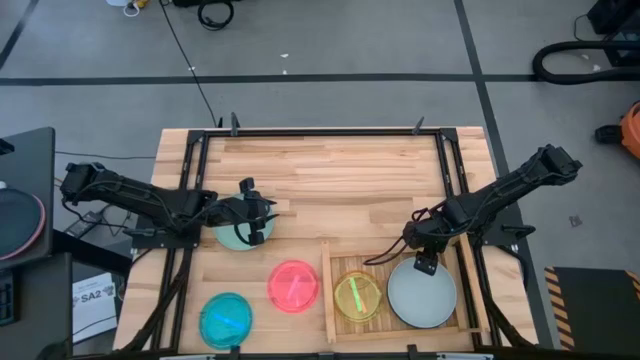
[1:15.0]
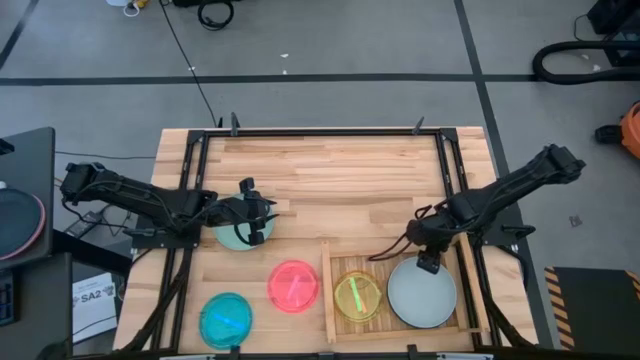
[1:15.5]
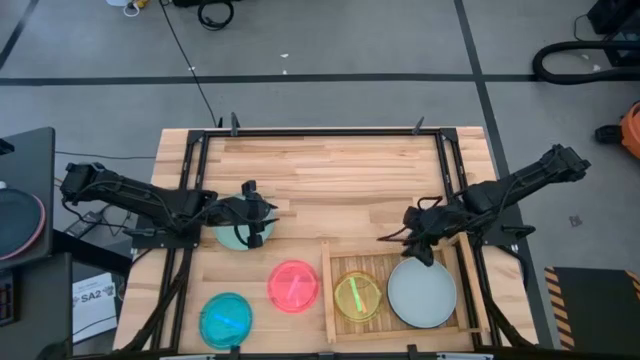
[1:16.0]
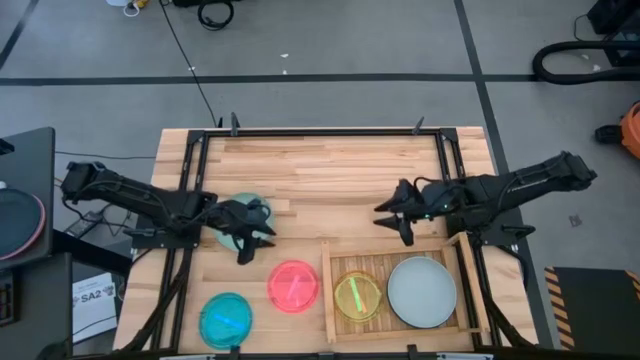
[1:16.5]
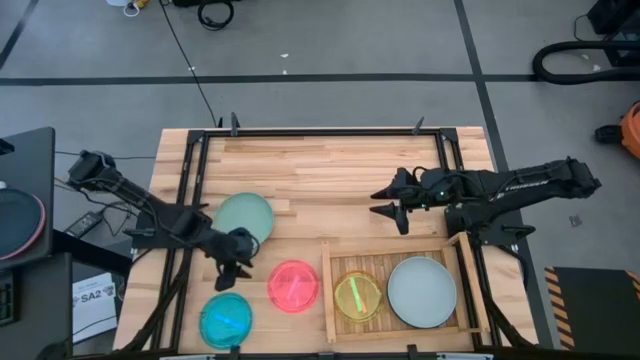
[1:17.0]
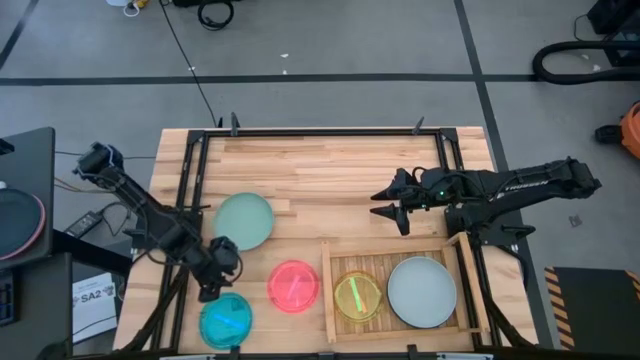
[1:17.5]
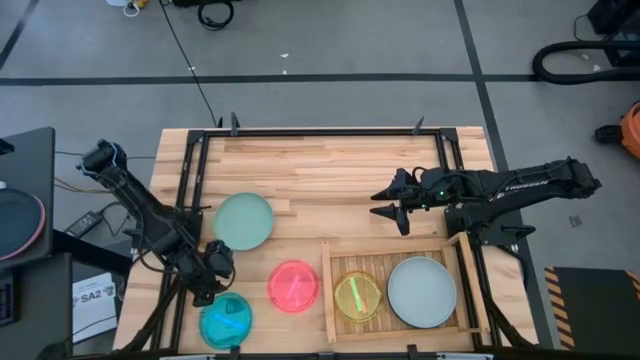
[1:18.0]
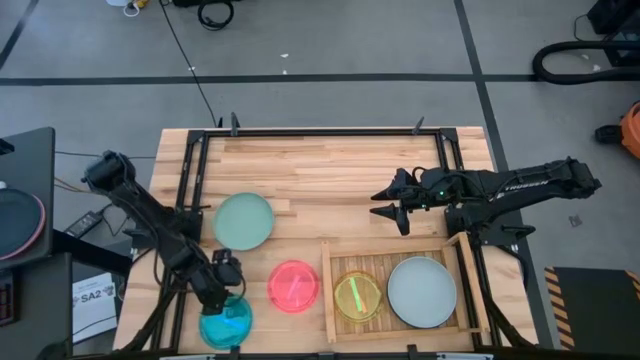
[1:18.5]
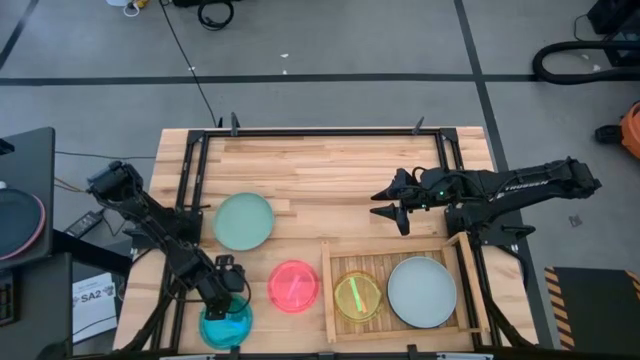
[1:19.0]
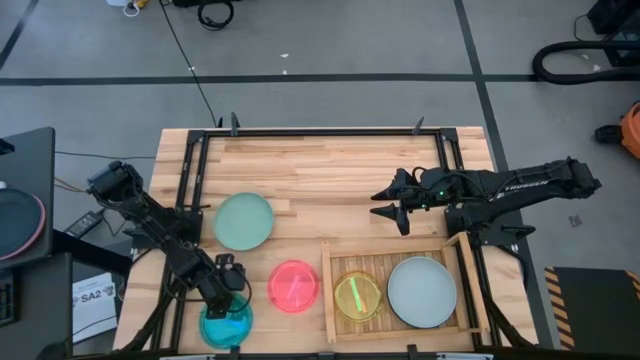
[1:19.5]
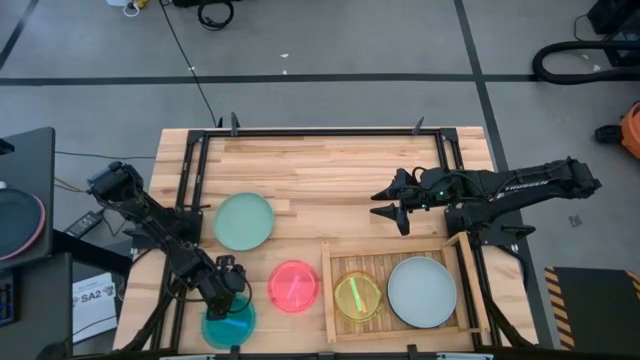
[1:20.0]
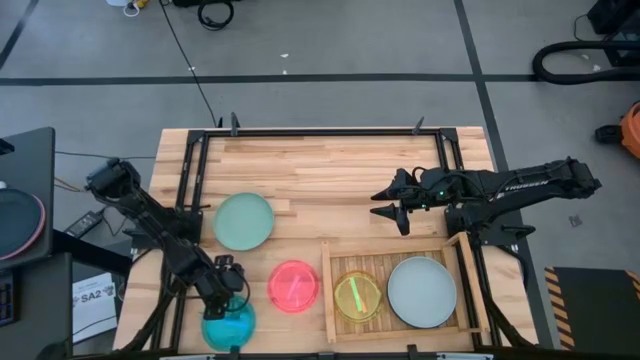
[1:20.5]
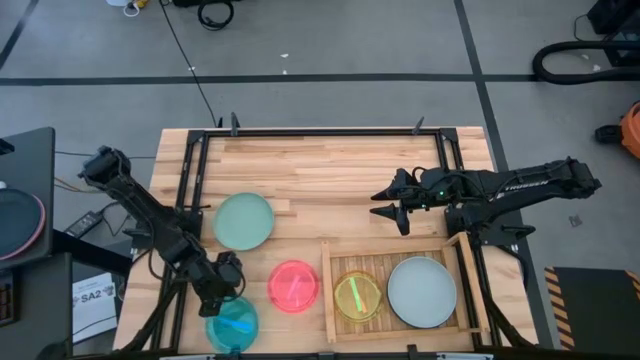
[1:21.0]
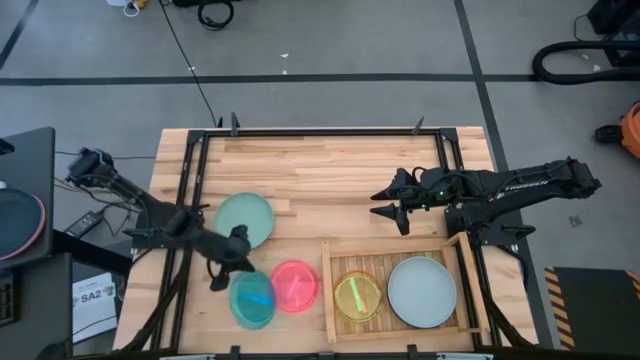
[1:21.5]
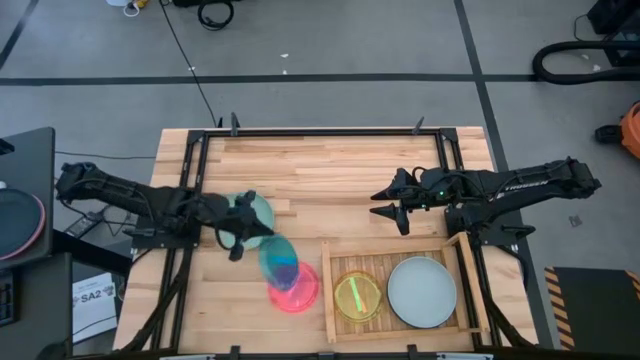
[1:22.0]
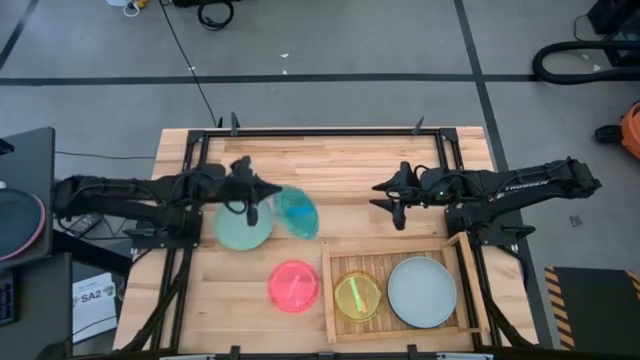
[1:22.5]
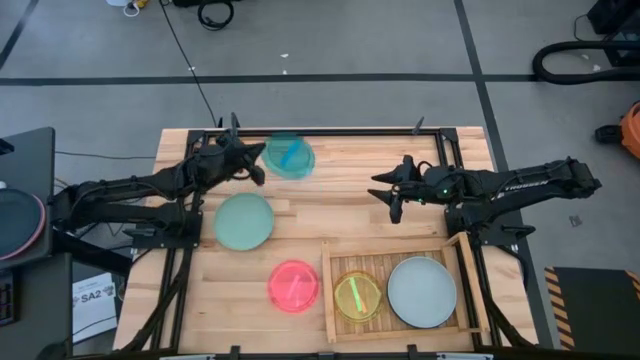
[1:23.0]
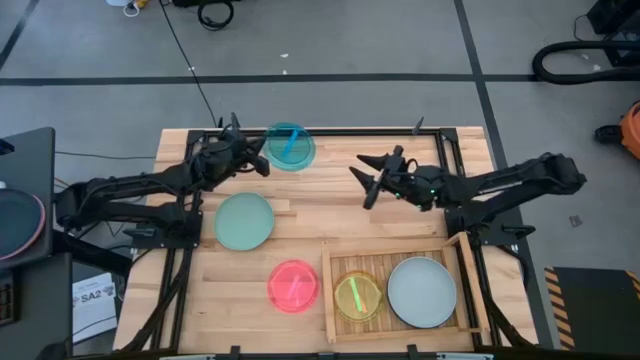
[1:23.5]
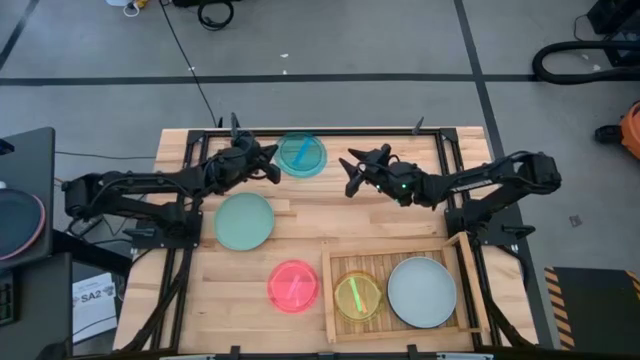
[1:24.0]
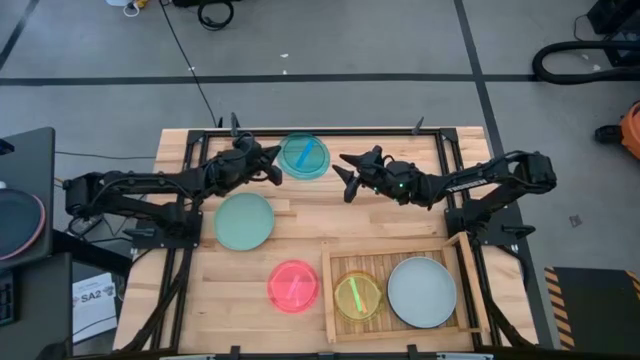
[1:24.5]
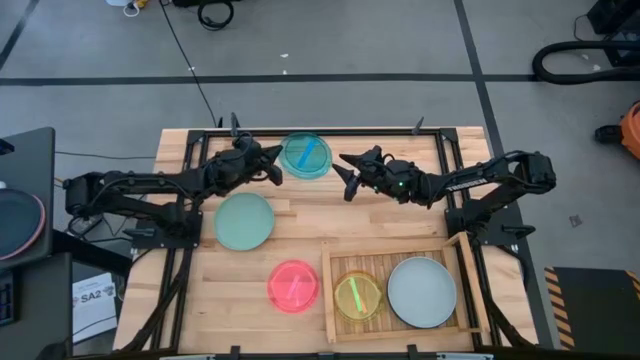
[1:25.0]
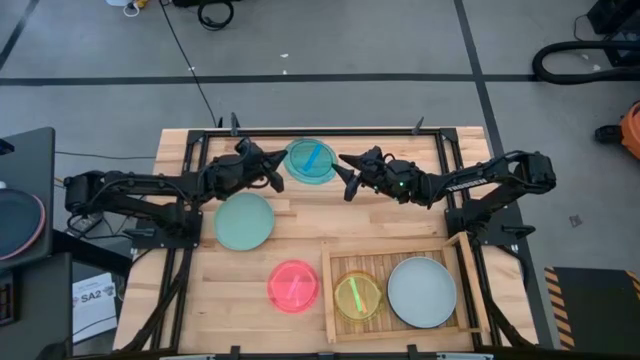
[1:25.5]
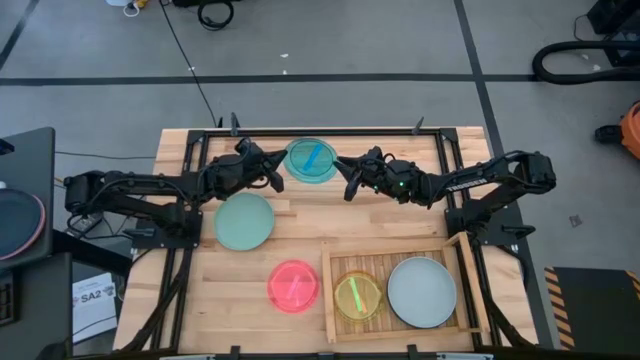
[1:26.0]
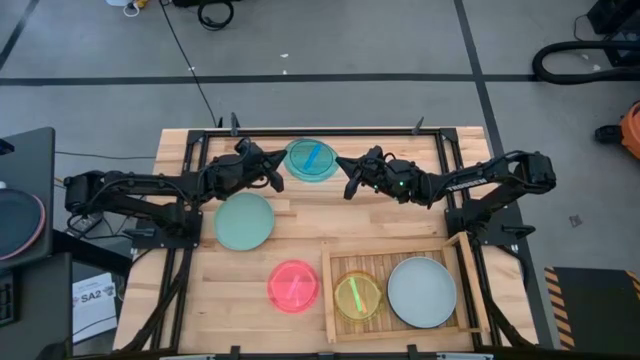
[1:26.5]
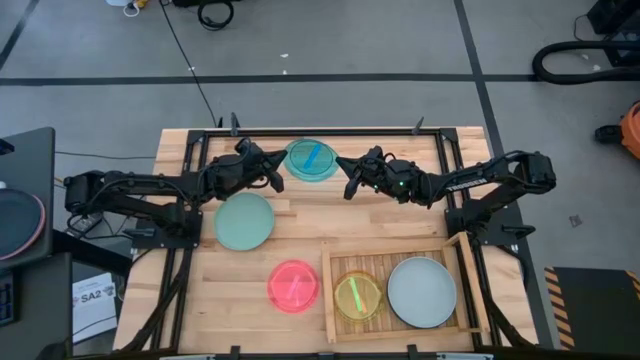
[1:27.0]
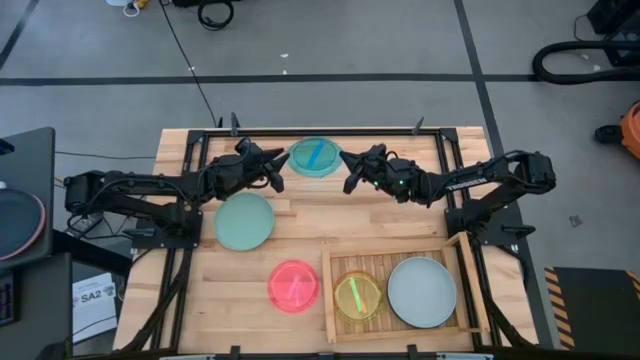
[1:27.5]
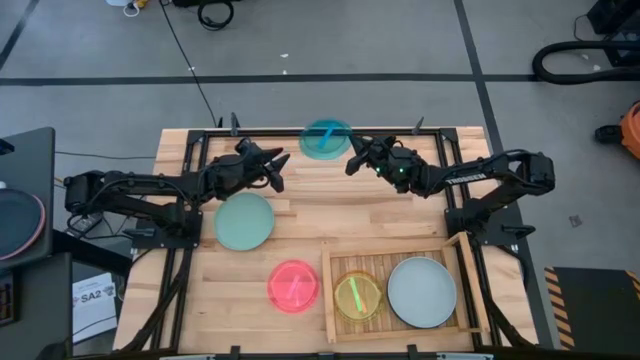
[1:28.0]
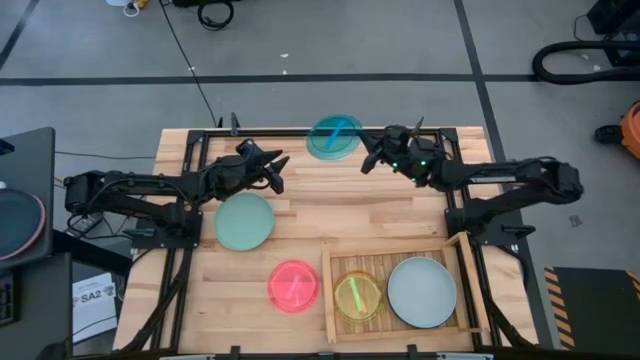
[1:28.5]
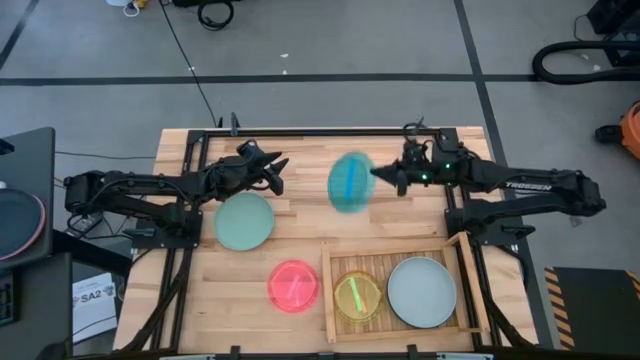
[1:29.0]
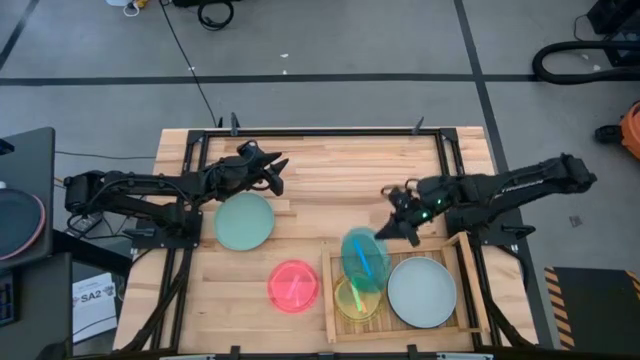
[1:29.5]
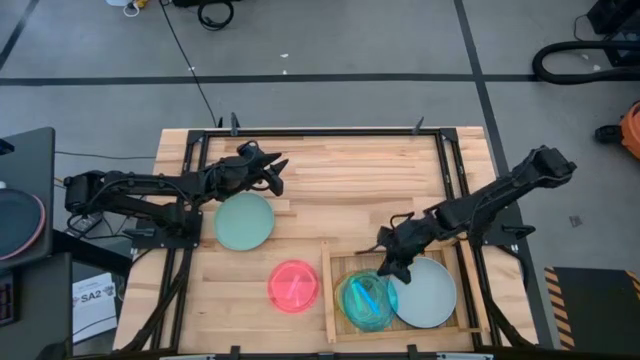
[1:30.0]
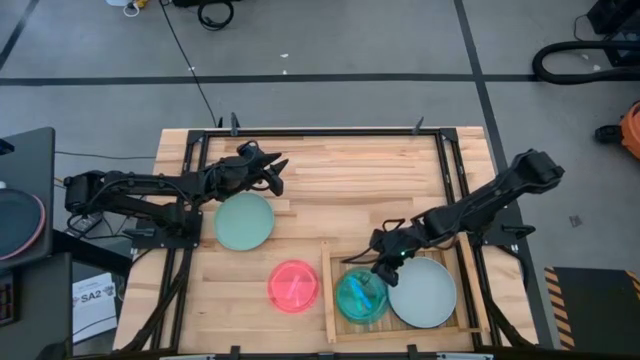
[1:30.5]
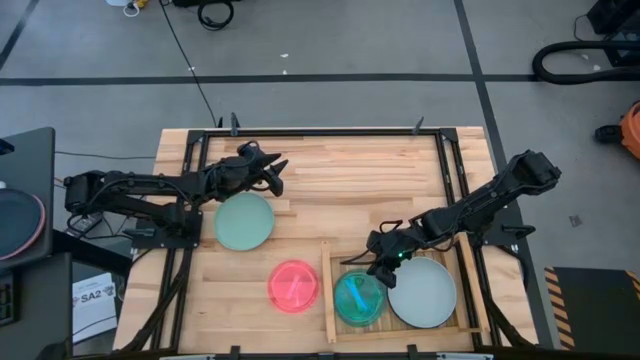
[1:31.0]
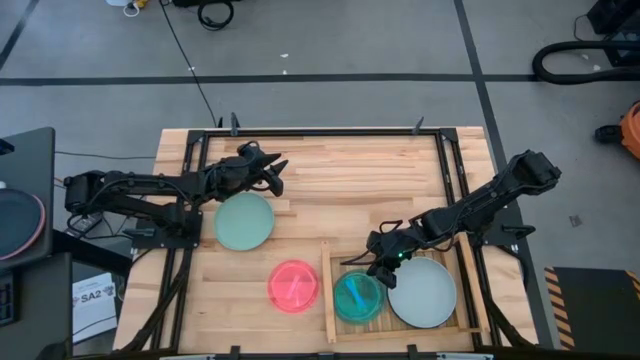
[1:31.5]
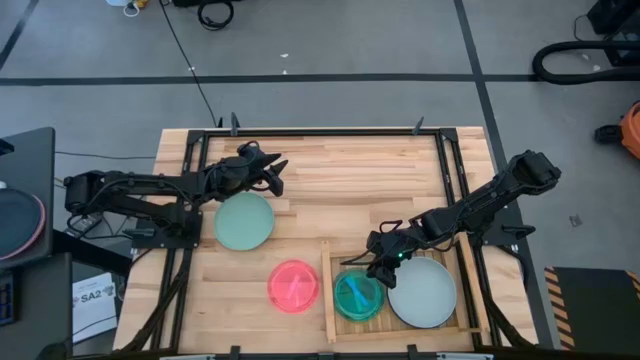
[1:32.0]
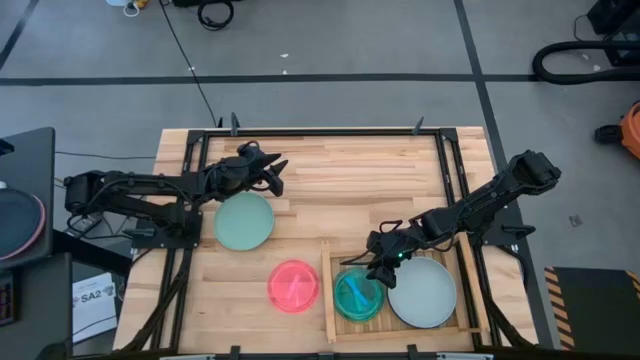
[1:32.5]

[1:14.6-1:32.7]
Task: Place and stack plates onto a shelf
Stack the blue plate on the green plate on the shelf

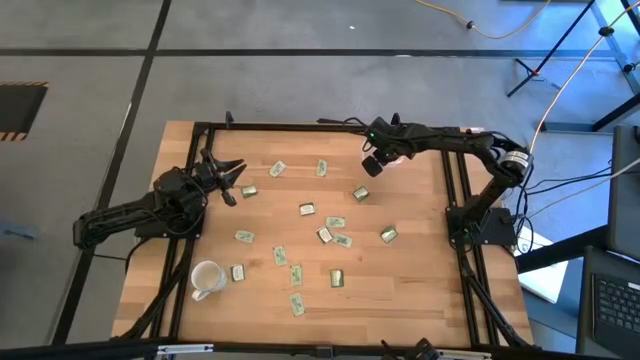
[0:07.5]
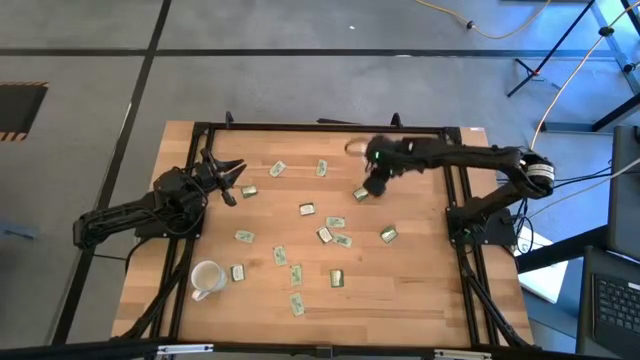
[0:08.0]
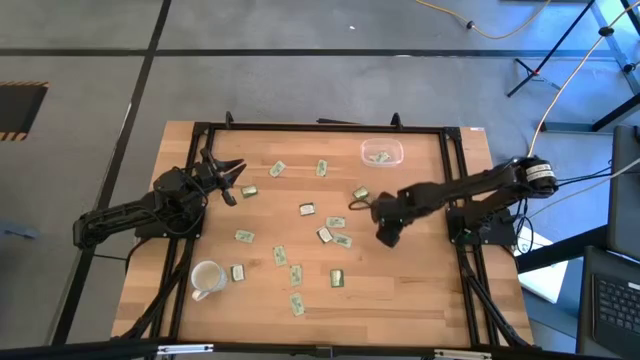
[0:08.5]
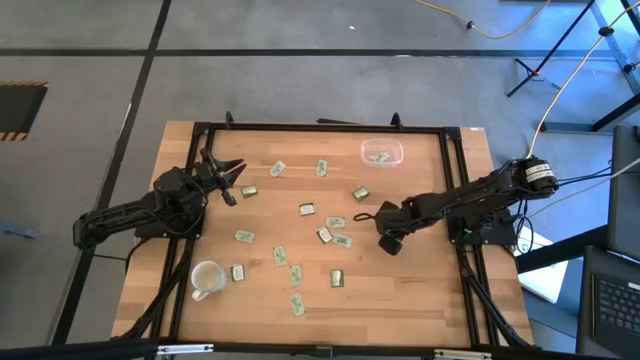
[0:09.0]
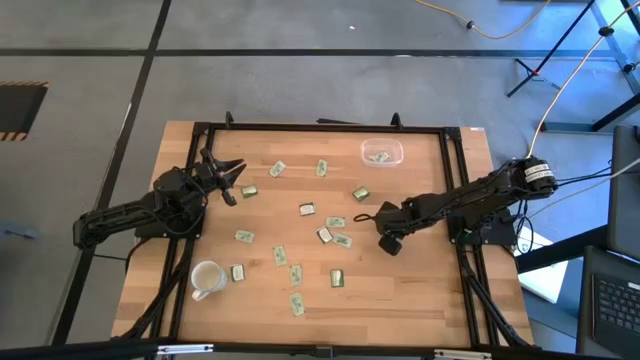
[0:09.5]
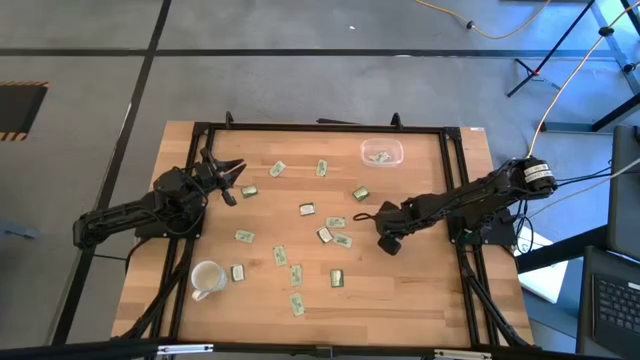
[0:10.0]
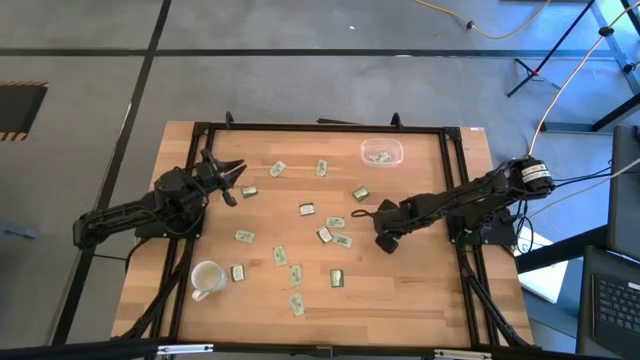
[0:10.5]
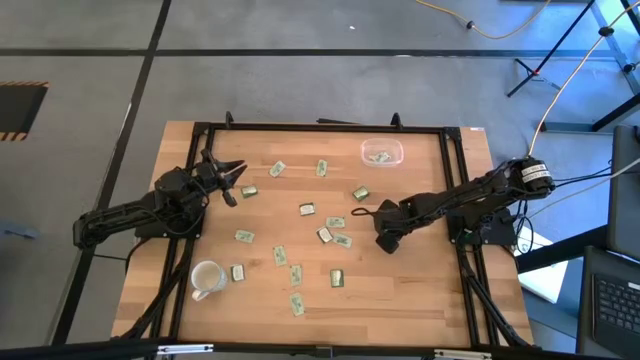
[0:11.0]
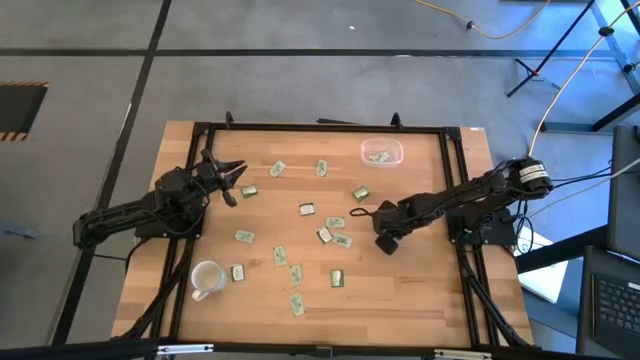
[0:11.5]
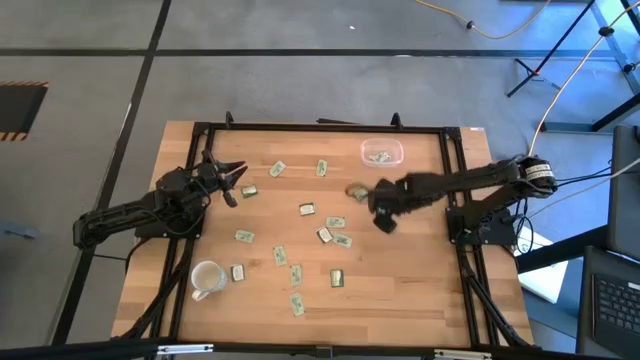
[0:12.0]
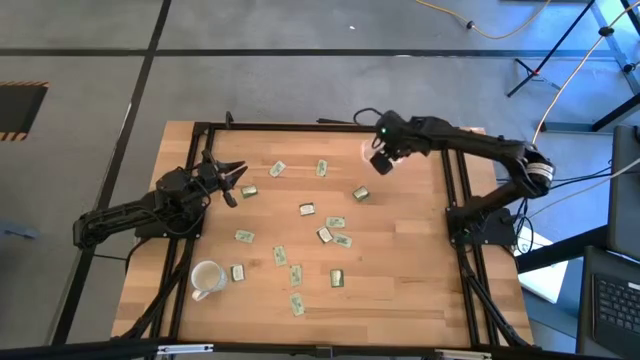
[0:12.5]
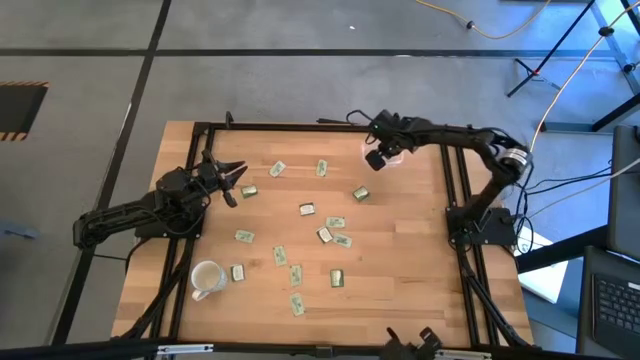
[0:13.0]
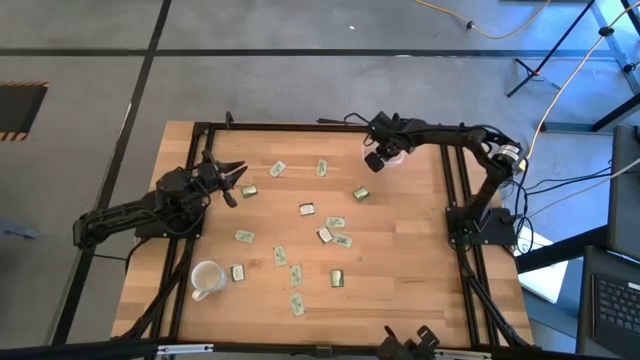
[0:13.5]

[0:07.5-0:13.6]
Task: Pick and place Stevia / Truvia into bins
Put the dark green truvia packet into the transparent container
